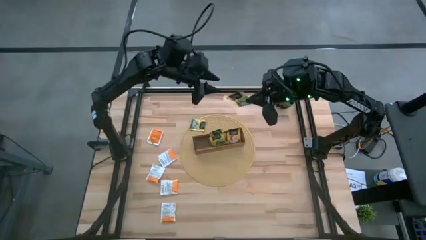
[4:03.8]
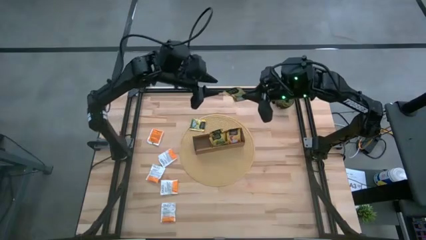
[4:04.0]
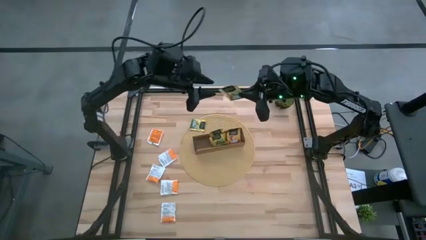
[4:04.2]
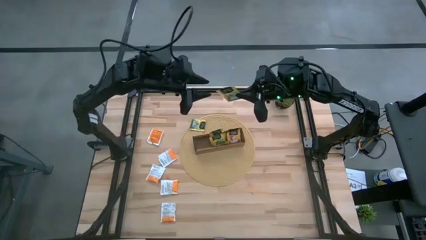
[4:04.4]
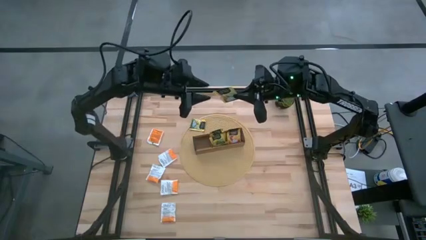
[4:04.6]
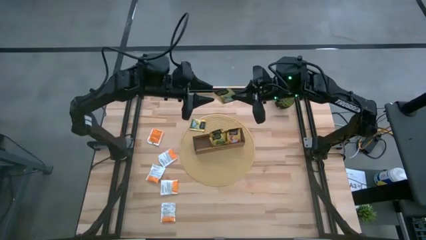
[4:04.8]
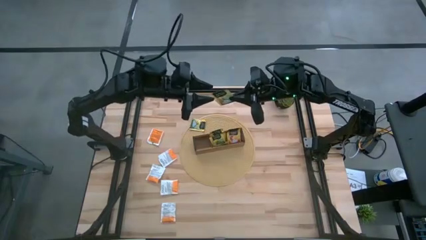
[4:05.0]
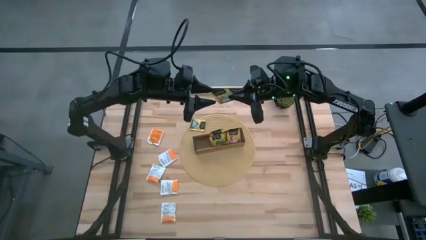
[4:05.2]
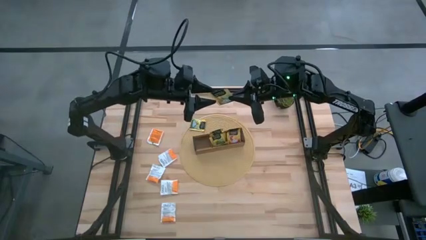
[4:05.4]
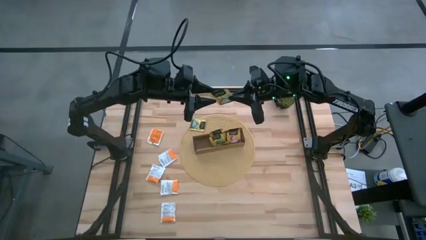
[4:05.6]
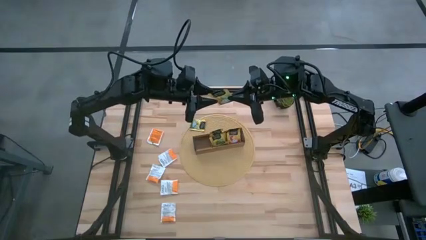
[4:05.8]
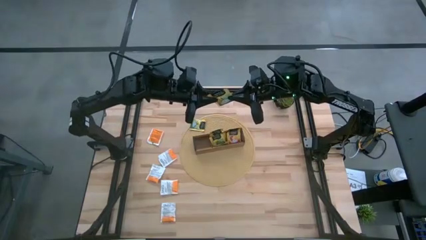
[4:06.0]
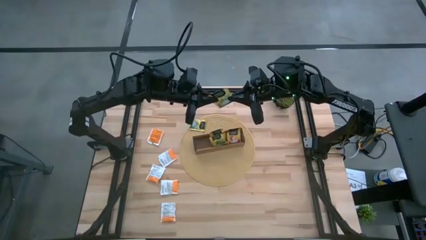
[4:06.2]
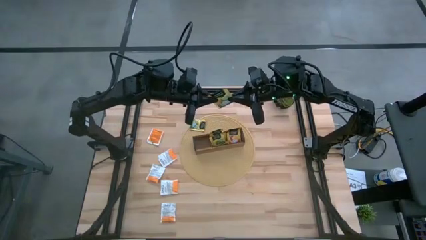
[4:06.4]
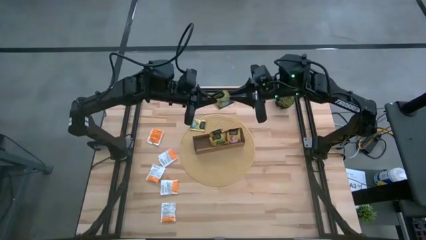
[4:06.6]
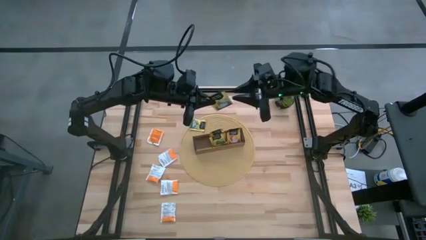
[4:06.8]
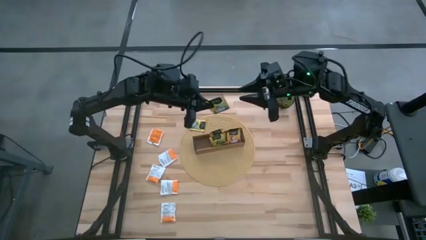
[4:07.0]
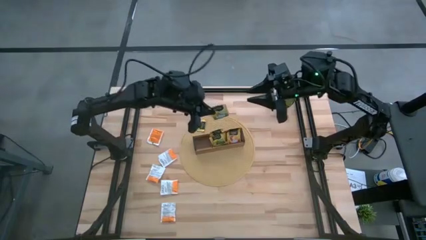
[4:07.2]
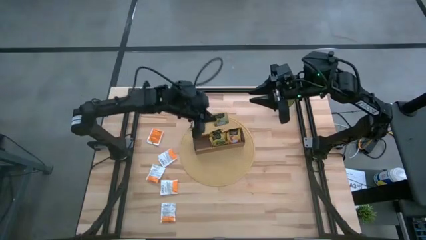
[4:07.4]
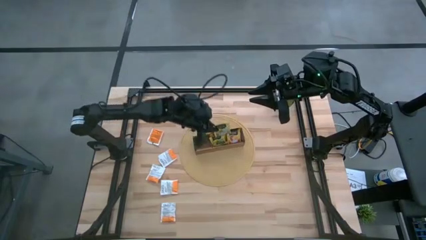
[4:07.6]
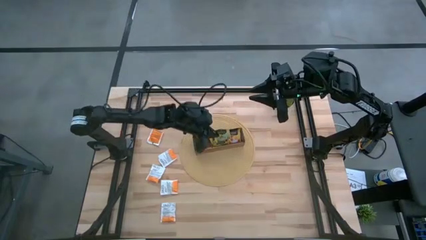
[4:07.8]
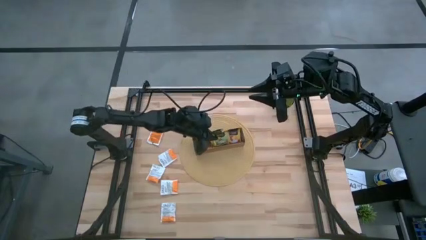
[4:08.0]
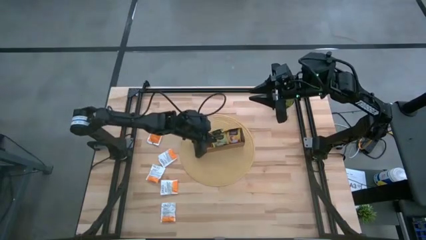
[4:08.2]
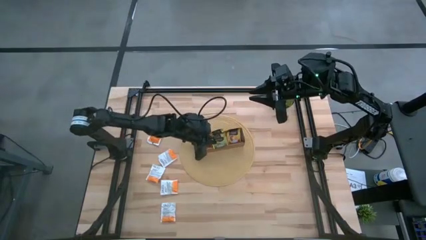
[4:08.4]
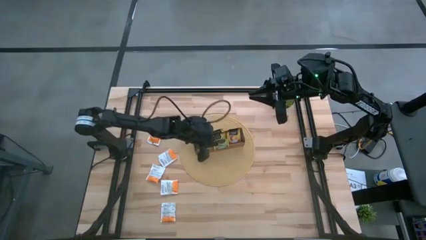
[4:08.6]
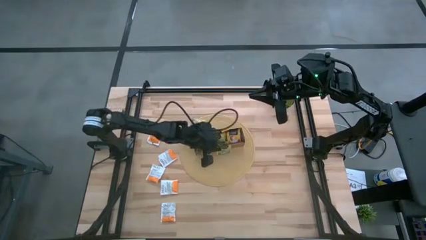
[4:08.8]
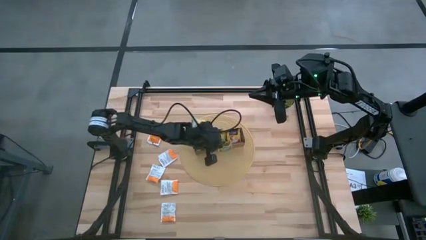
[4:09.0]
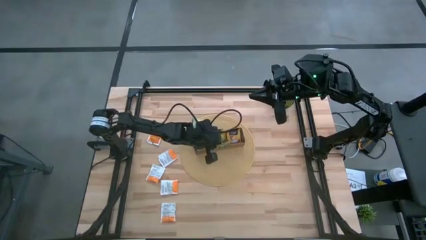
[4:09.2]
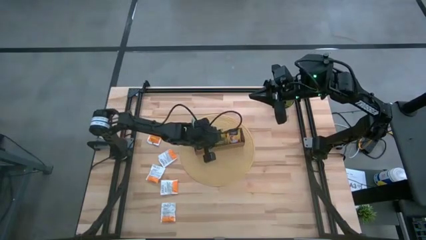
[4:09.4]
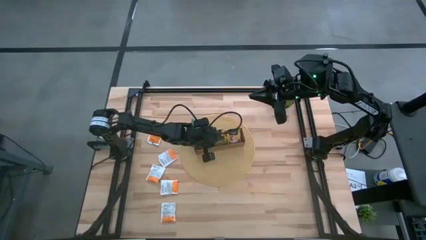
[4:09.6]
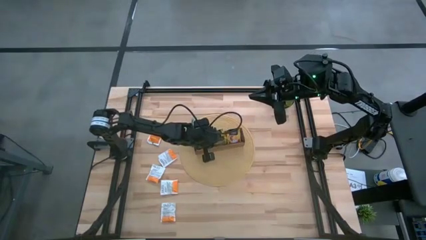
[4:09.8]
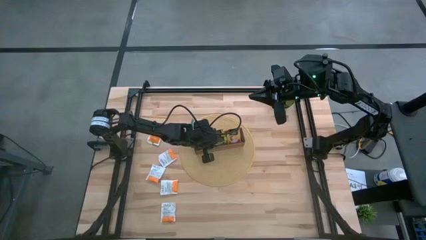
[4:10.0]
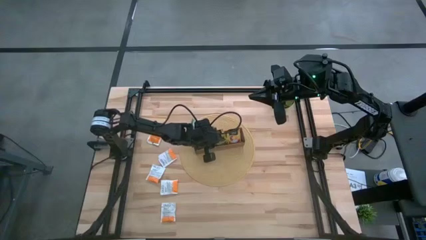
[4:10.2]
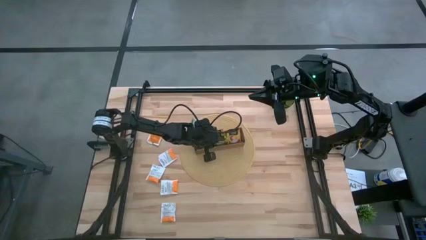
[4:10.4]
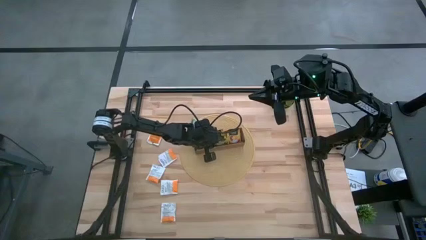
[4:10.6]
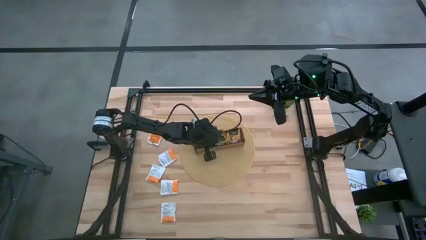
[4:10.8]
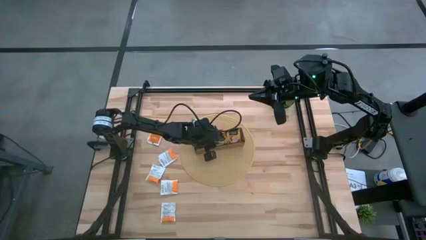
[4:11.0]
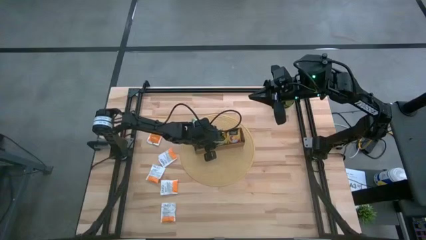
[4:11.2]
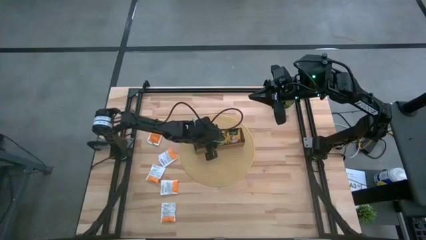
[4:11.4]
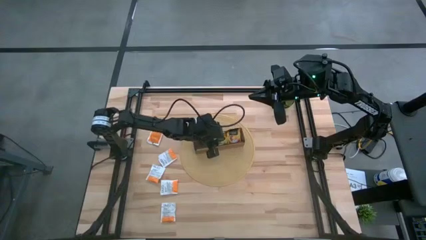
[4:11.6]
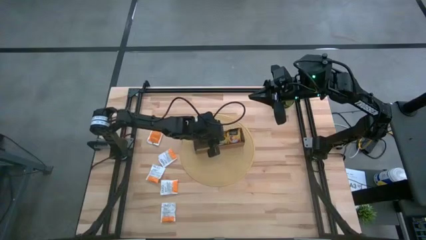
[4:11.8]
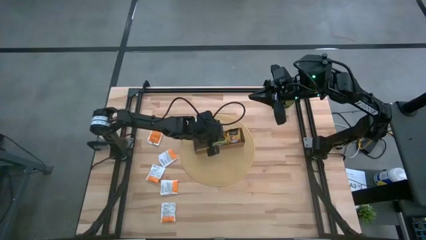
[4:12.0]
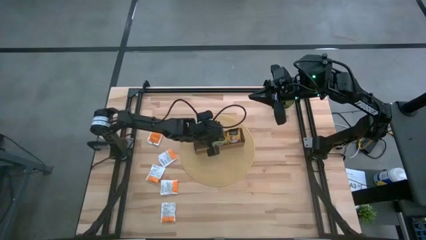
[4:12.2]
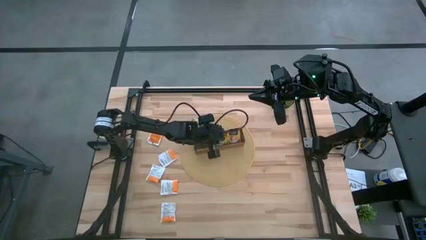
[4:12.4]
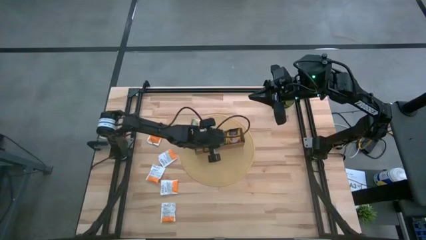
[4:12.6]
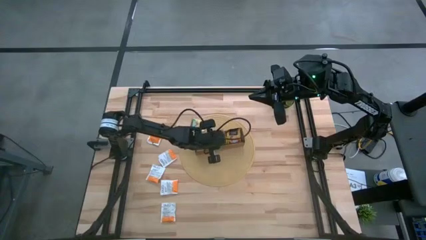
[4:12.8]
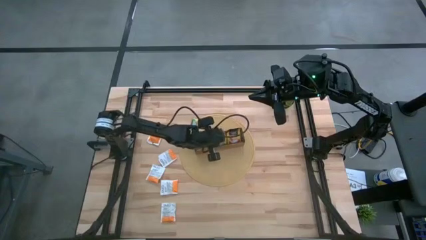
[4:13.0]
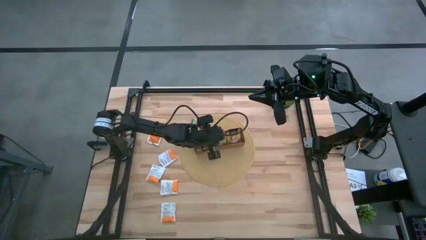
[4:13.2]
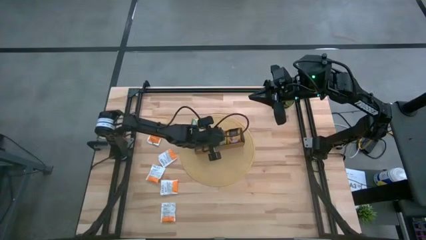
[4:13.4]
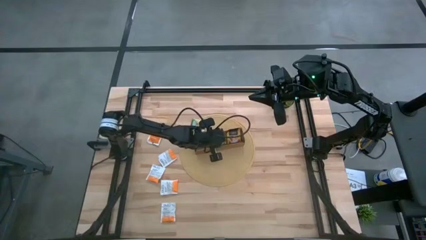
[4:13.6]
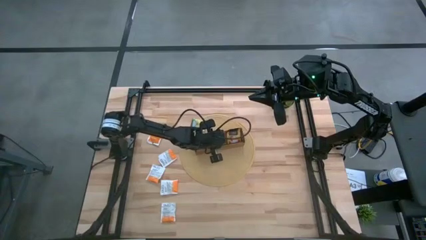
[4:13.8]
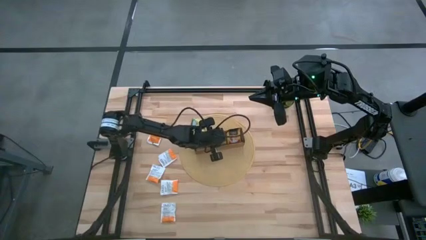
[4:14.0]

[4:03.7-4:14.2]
Task: Pick & Place Tea
Put the yellow tea bag into the middle section of the wooden organizer

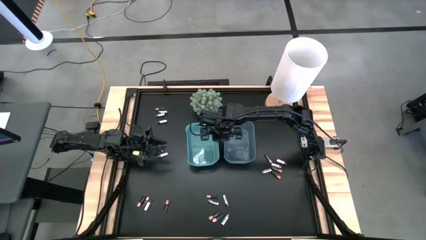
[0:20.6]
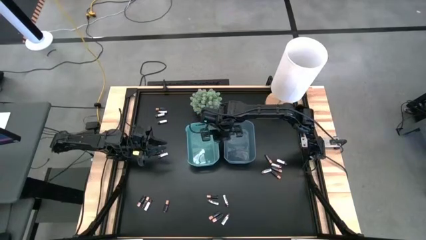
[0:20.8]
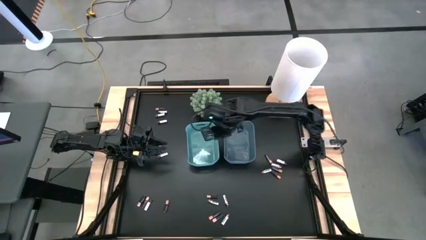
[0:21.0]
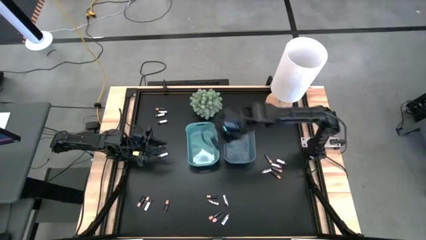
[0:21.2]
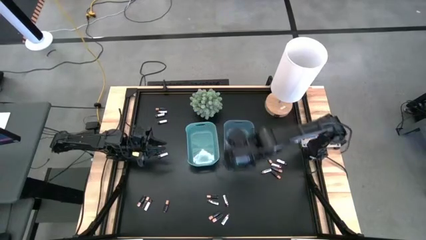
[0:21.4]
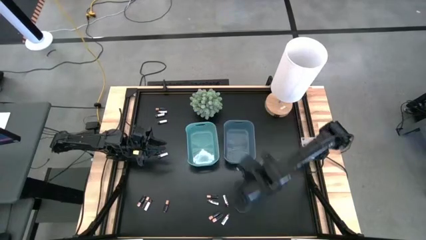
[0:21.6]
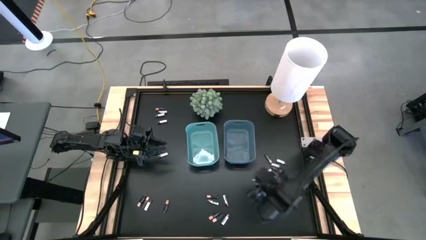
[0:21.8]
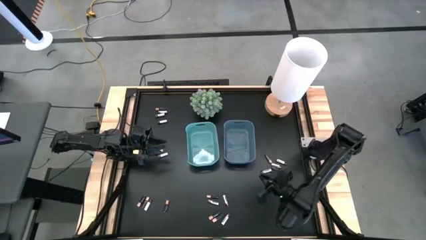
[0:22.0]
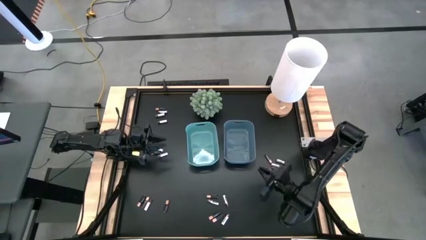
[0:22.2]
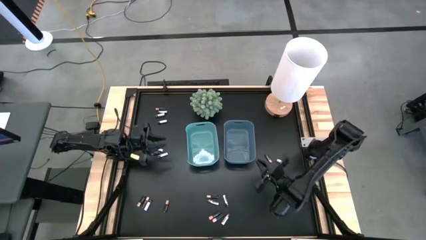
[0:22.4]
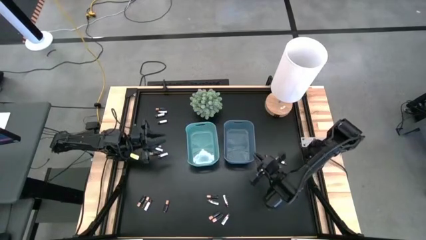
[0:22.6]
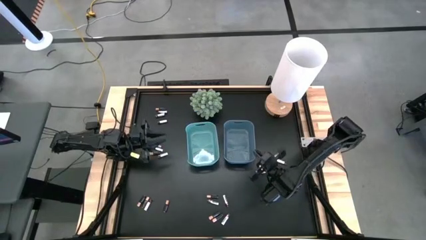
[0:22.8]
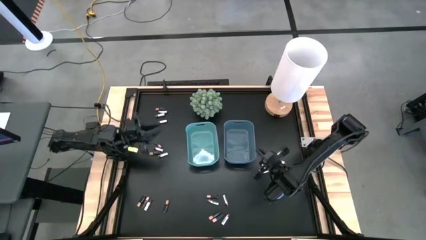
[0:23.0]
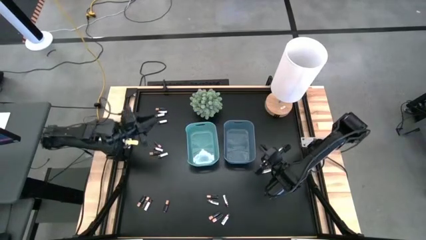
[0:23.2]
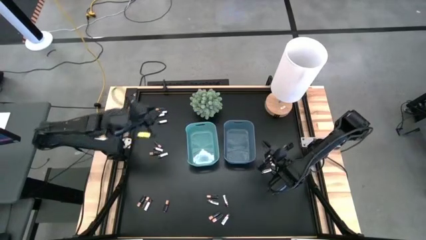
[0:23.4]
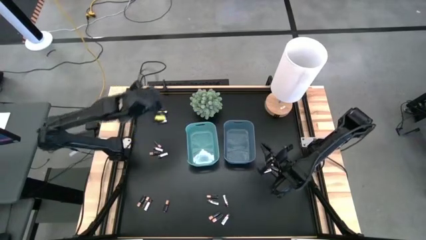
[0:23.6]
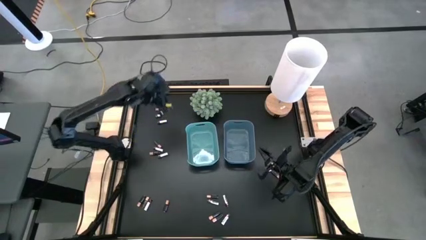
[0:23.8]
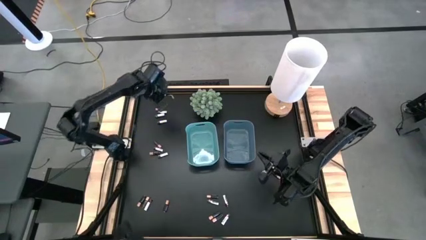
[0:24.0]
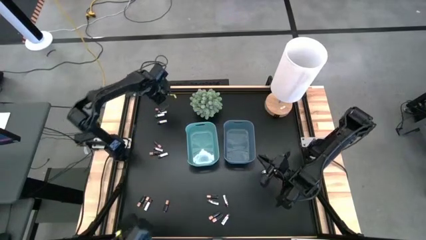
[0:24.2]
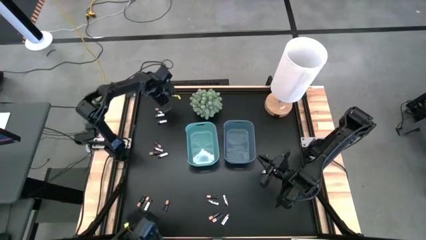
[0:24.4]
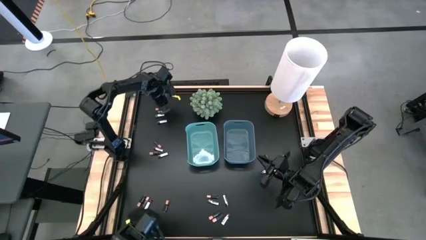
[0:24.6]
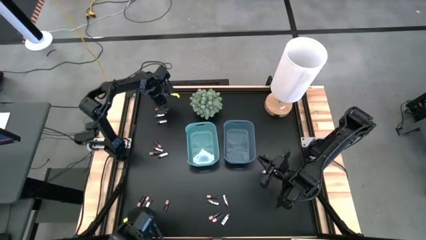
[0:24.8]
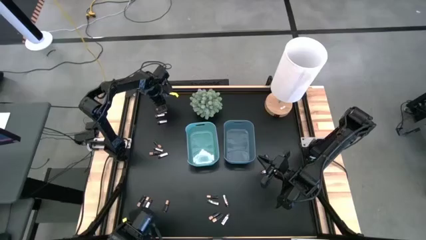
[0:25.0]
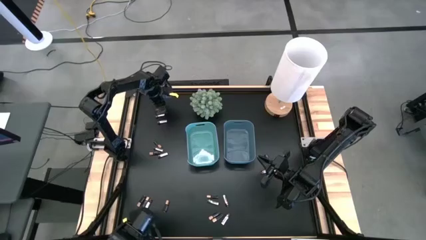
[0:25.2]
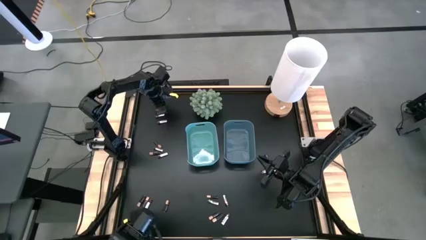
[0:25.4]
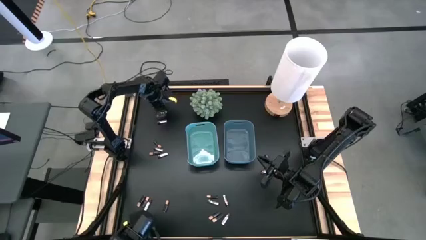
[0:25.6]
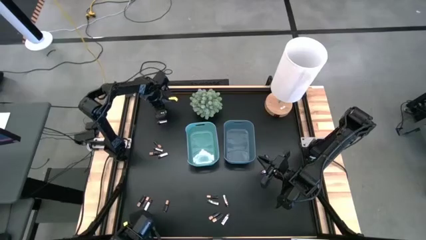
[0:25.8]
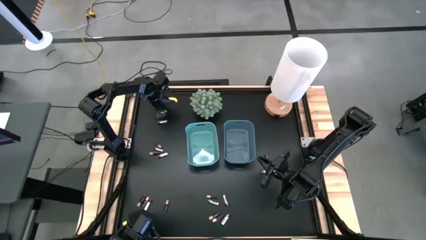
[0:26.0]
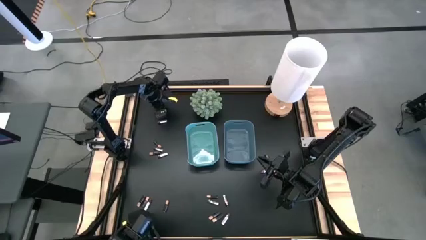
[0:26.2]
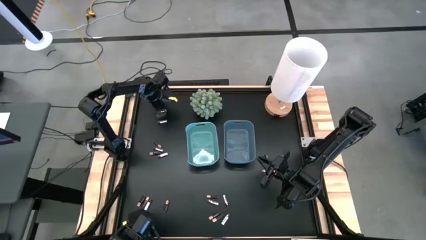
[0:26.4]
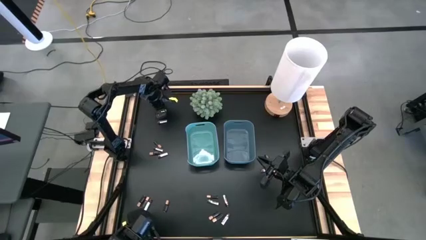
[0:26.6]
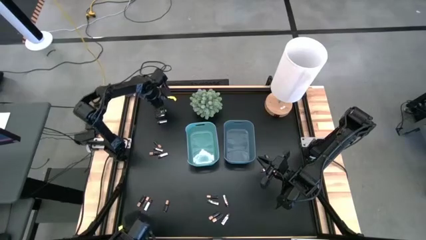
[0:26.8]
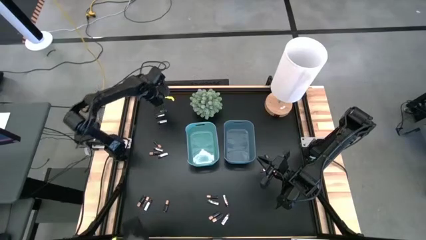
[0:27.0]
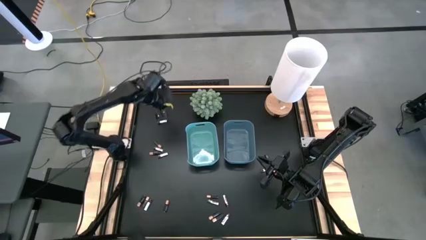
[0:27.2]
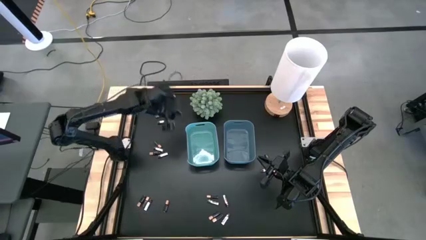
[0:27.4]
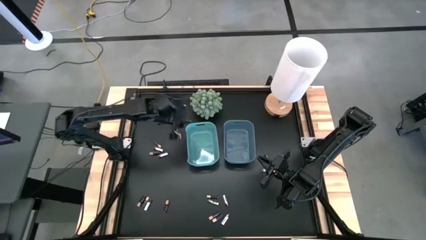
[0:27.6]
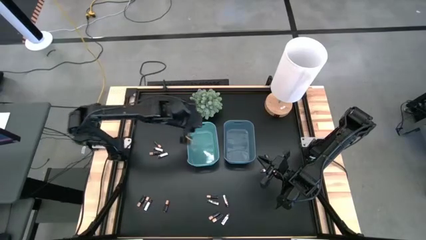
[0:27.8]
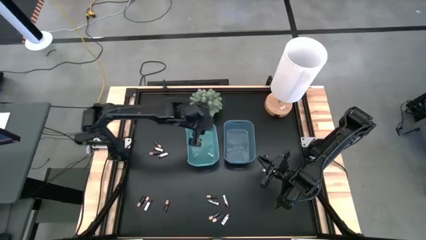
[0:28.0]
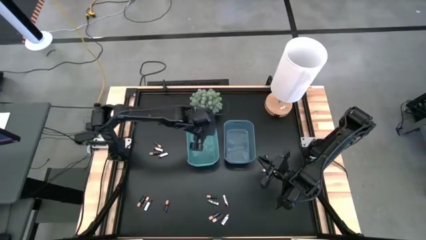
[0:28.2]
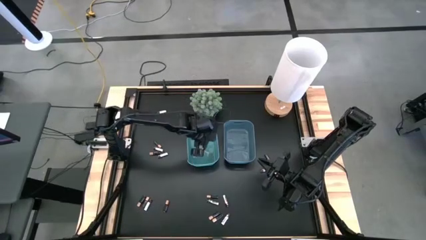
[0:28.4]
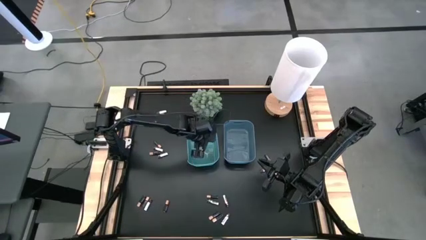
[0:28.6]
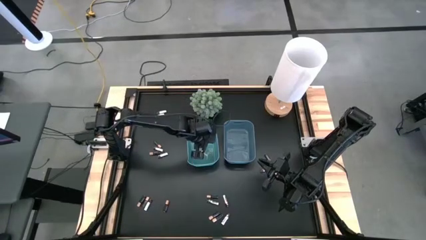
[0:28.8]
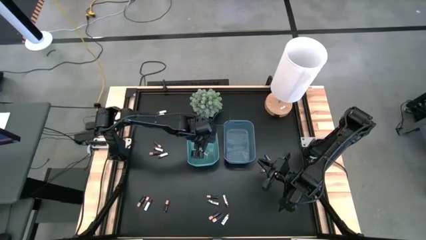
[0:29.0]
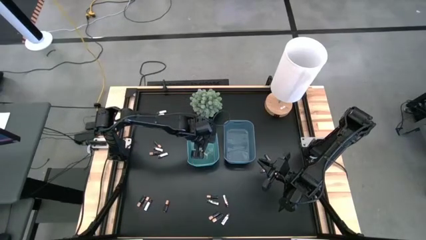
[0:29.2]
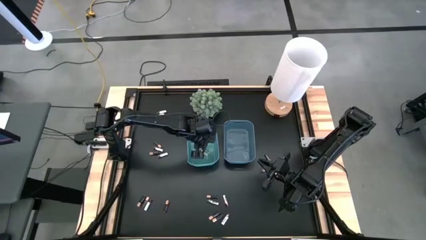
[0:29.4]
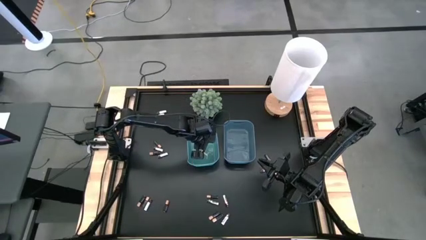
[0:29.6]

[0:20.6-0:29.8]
Task: Sort batteries
Put the black battery into the green bin
